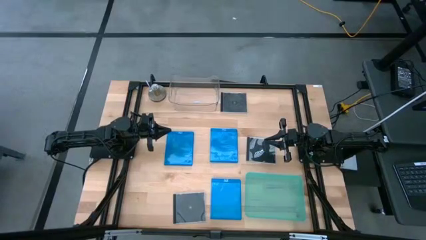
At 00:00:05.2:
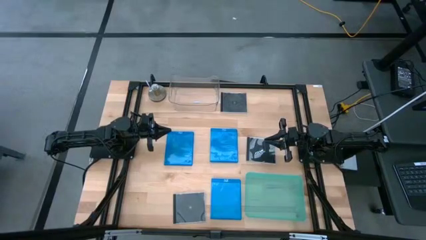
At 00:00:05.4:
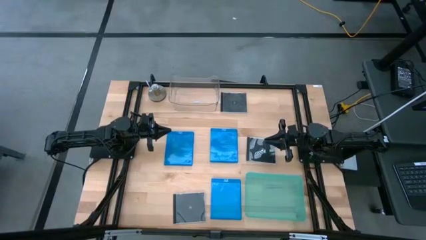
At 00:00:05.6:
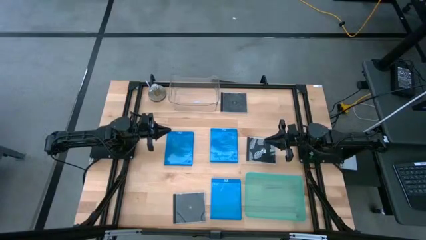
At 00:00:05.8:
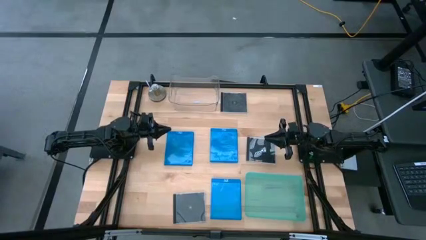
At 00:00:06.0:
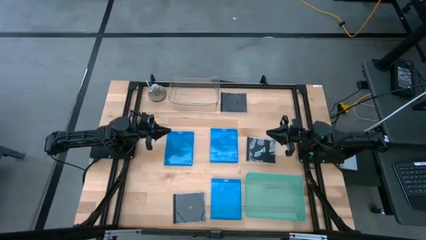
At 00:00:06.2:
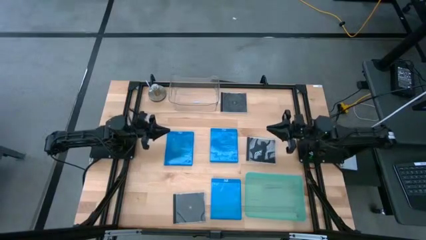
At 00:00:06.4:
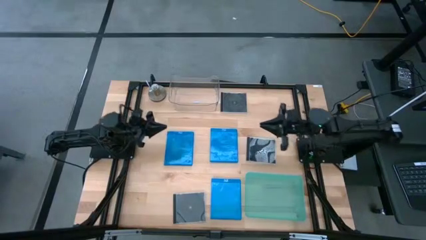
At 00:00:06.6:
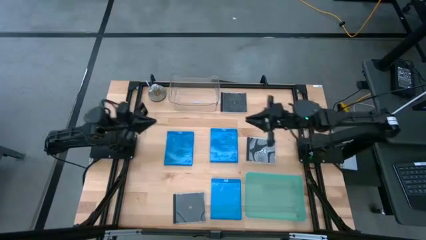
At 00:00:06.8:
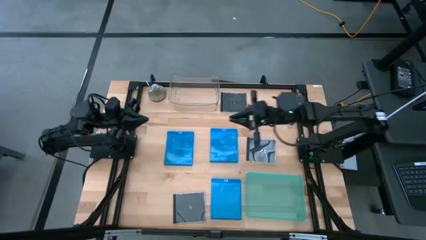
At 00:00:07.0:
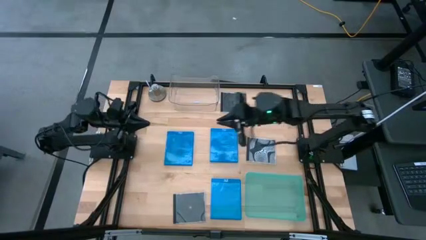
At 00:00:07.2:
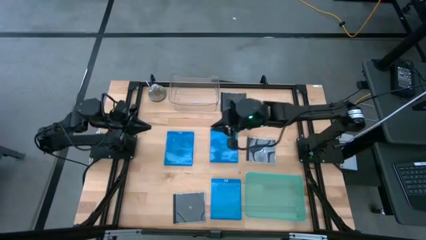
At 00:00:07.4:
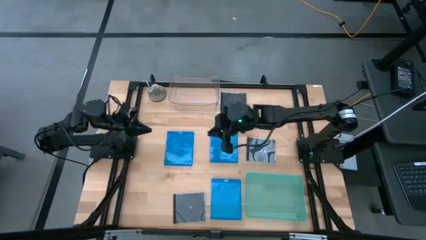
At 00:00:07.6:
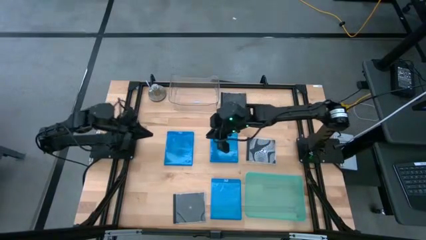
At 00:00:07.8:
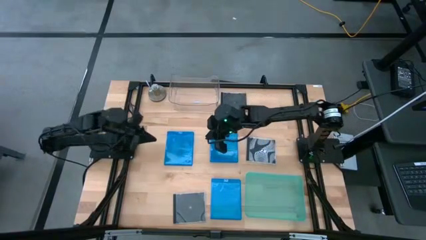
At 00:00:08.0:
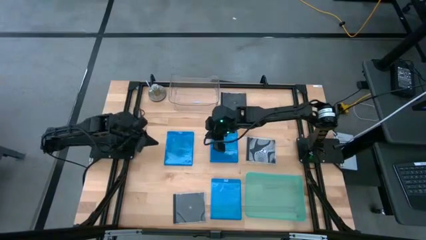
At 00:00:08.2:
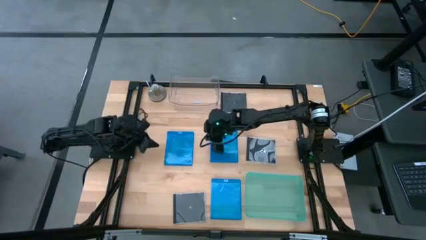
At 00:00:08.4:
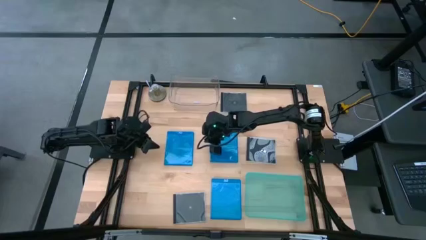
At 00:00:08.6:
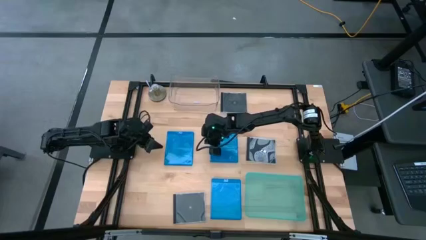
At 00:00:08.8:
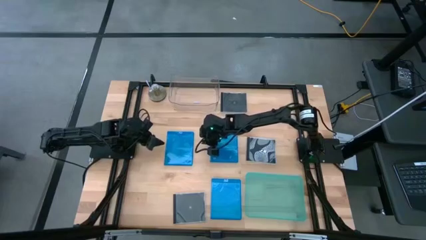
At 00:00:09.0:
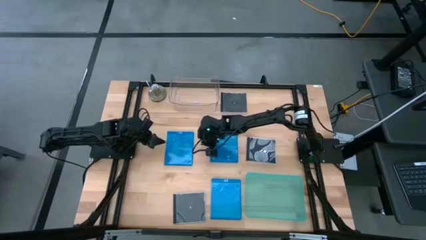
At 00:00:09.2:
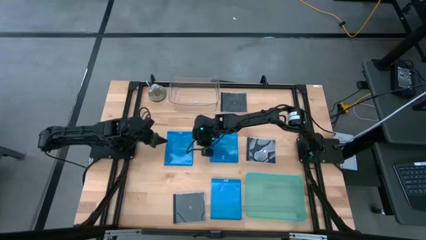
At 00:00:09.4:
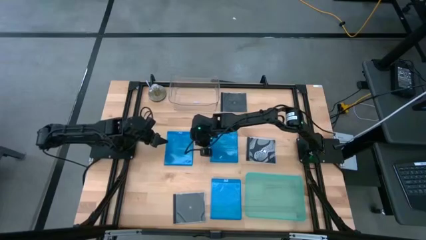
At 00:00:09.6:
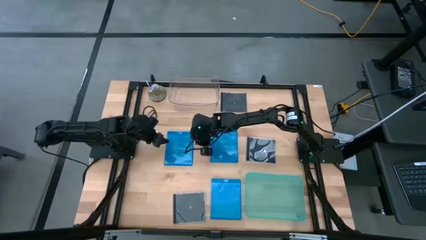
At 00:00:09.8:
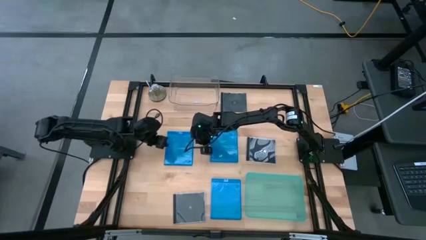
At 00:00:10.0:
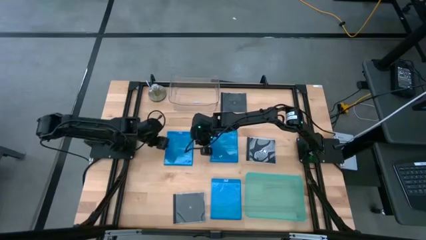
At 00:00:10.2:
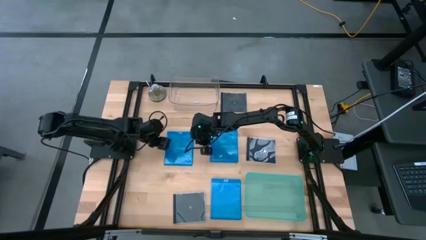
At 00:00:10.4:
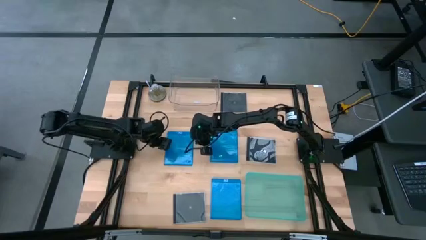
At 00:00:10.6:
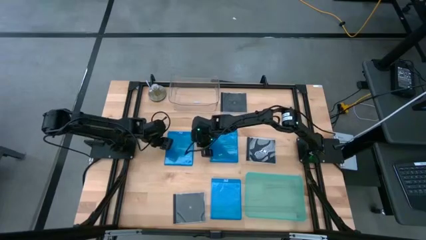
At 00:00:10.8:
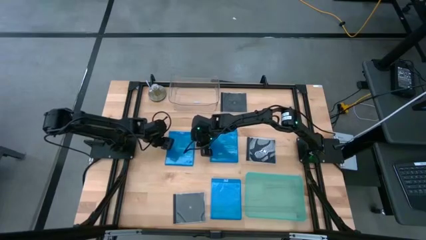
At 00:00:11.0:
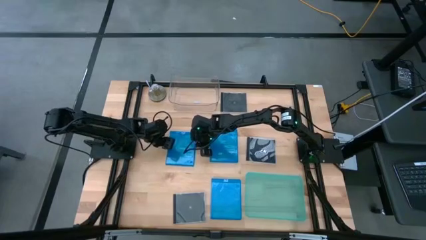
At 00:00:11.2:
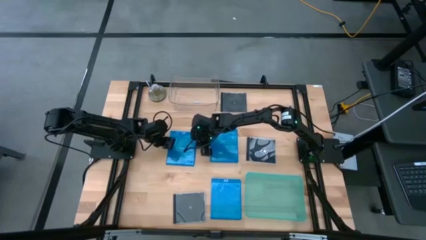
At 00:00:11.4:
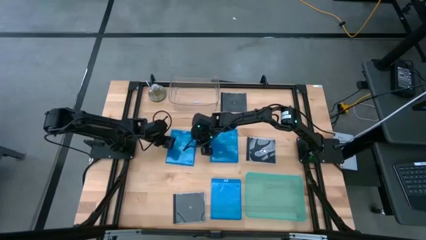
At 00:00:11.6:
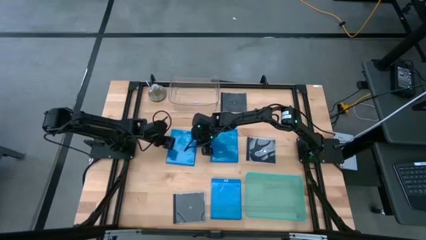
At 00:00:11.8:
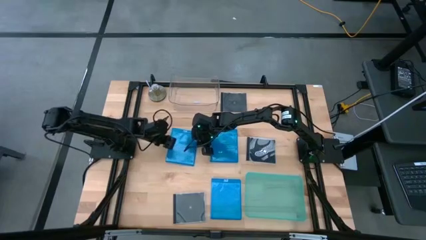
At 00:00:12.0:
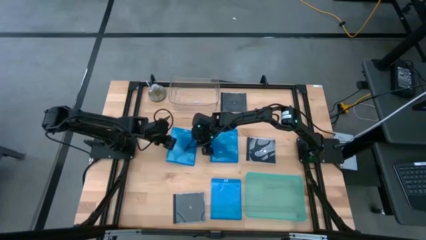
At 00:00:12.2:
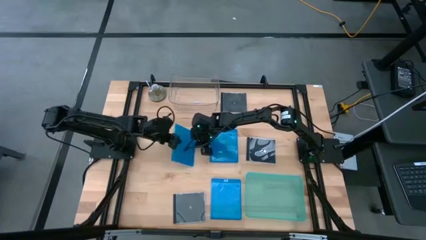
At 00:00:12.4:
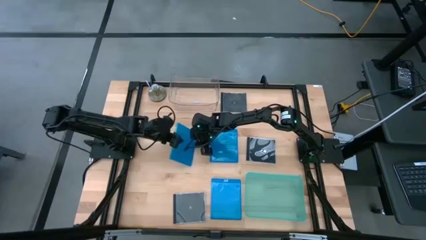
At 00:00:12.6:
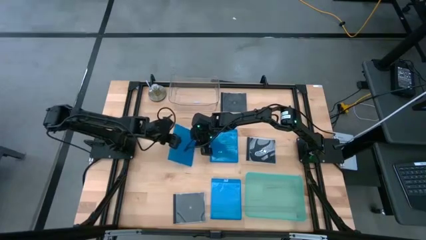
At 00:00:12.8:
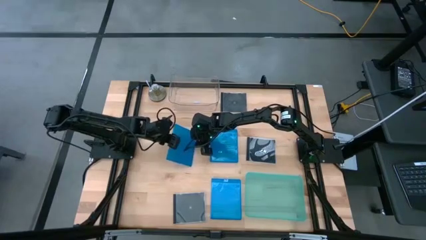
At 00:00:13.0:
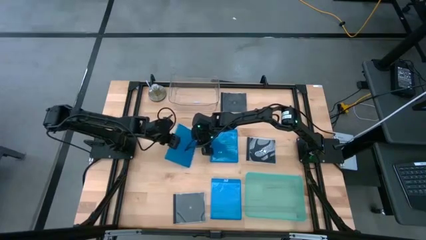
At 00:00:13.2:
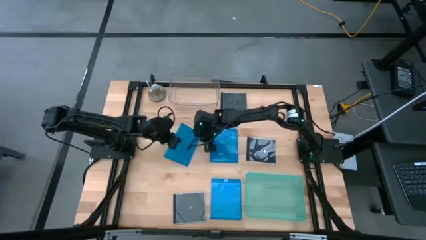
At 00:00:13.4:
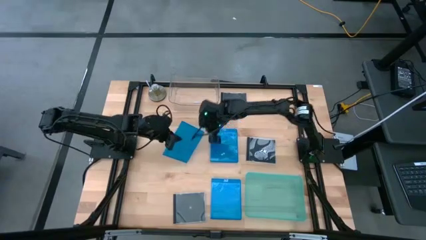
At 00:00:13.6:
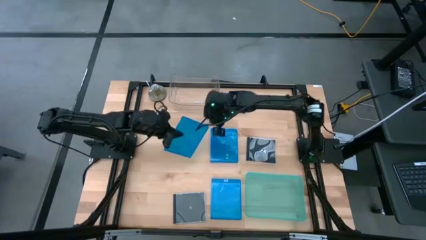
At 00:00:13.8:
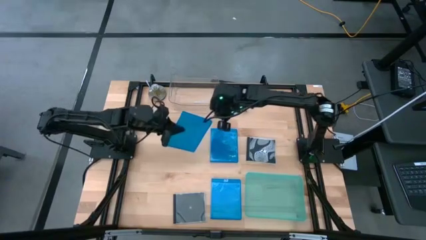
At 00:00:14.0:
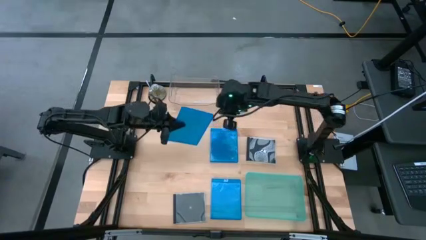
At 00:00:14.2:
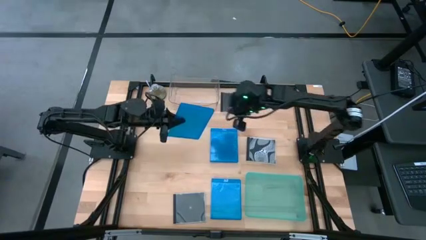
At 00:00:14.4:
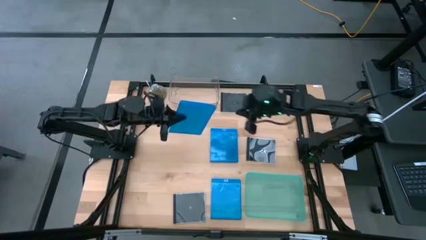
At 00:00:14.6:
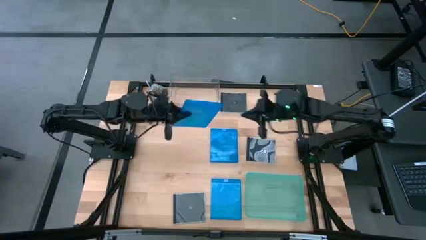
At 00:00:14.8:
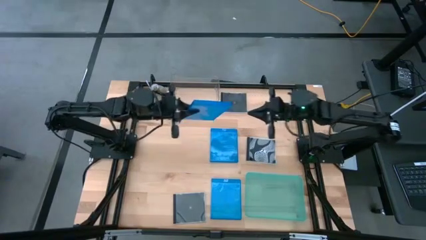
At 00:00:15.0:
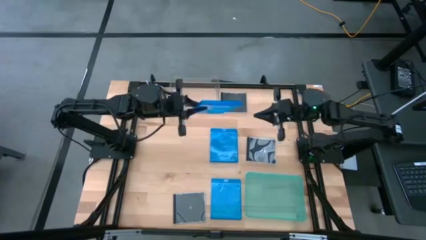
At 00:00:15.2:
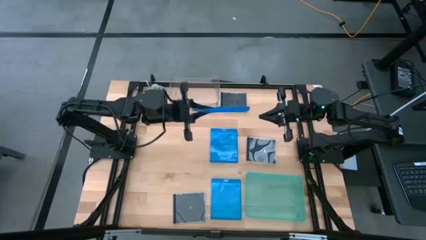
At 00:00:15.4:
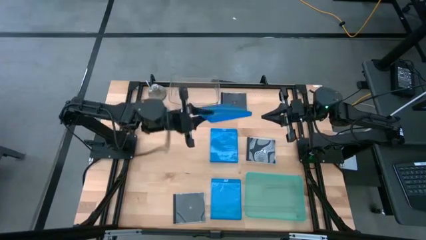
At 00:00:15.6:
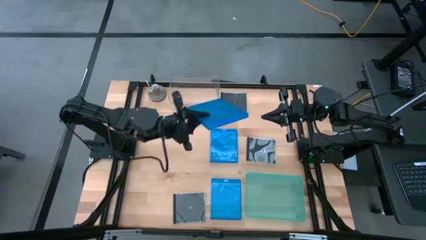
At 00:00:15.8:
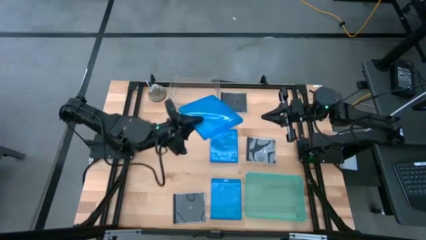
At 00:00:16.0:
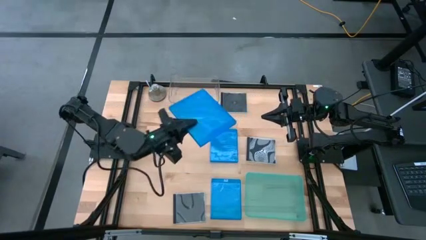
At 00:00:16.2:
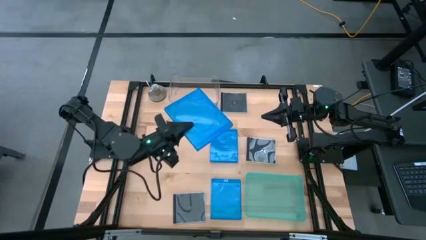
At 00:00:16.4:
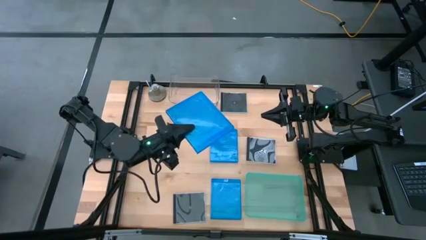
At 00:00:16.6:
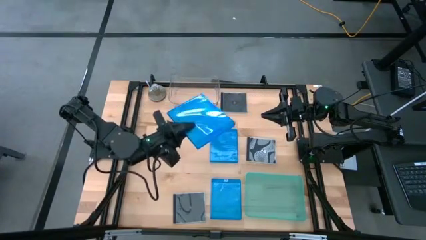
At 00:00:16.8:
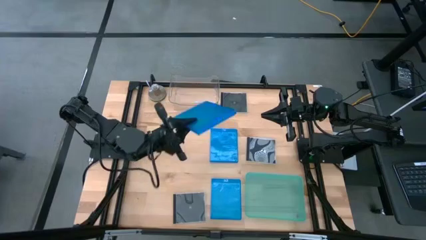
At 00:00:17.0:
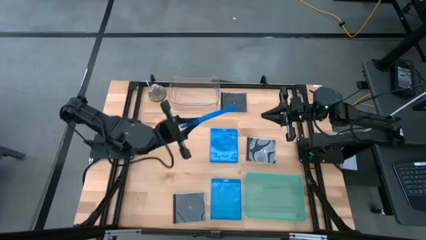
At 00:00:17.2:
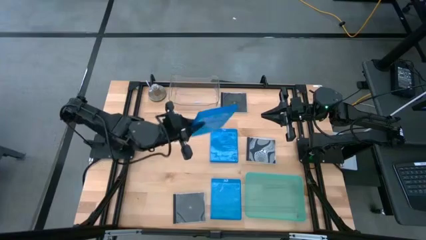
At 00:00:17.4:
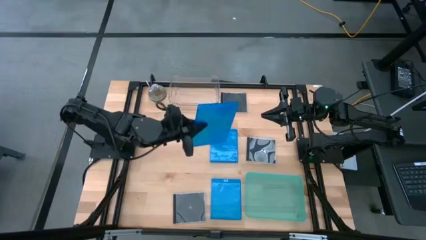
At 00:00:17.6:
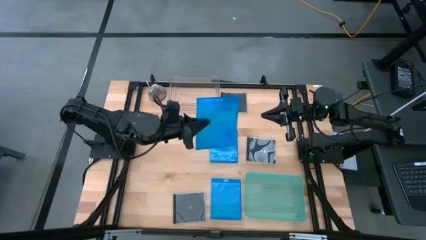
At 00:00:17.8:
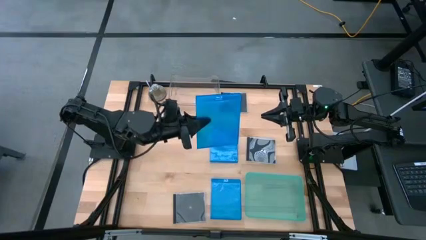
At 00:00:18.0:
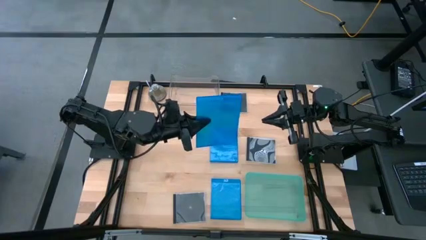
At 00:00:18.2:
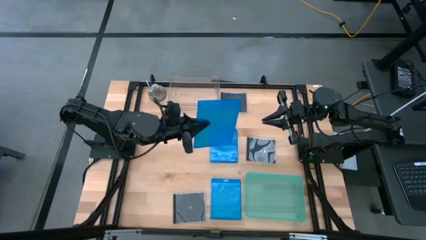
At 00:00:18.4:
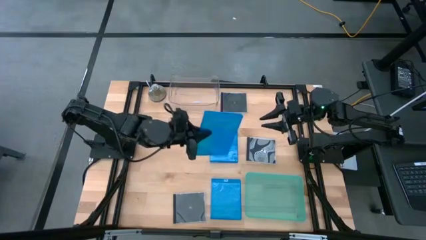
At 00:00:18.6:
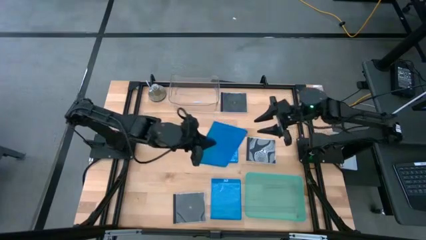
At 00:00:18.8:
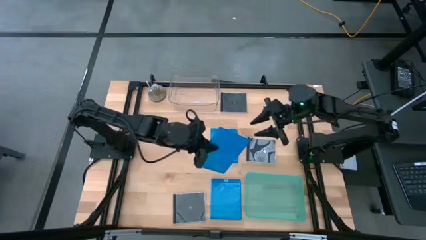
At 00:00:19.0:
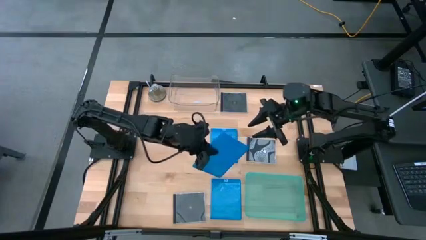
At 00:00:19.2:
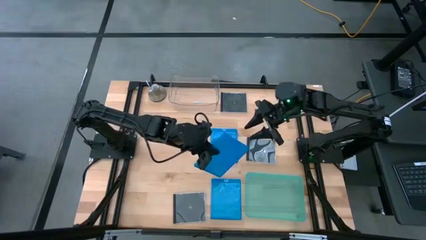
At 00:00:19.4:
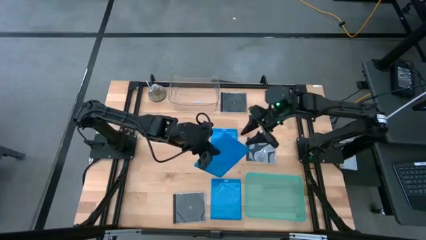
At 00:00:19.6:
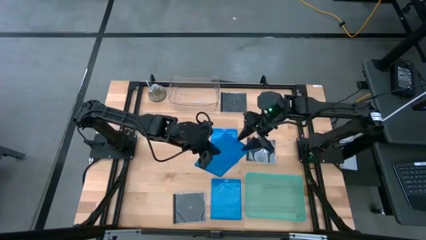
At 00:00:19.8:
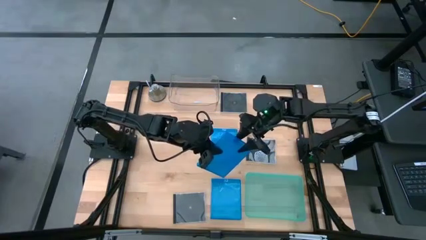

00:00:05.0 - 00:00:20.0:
Task: Pick & place jewel cases by type
Put the top left blue cd case into the green bin
